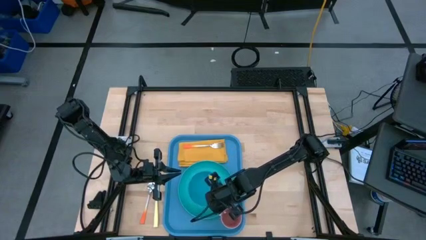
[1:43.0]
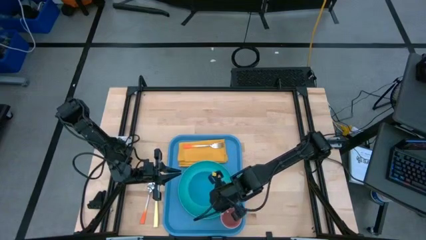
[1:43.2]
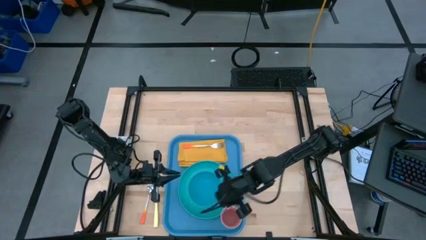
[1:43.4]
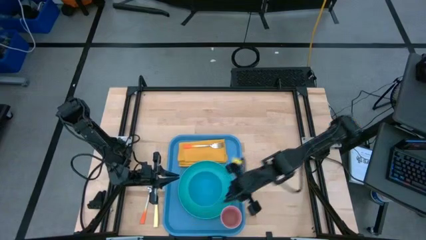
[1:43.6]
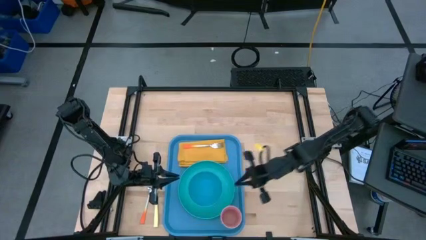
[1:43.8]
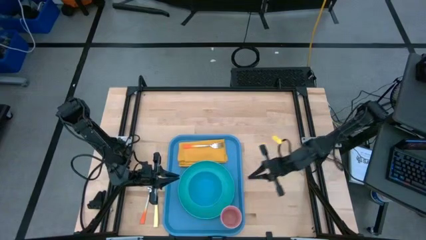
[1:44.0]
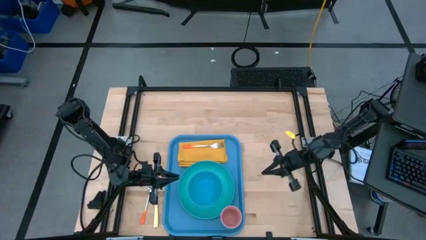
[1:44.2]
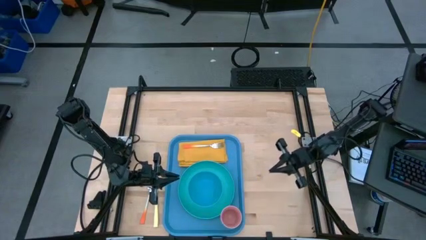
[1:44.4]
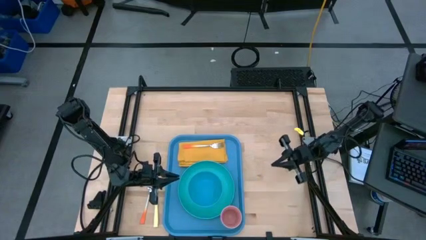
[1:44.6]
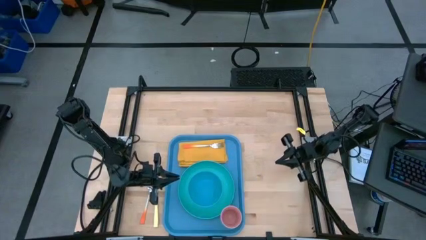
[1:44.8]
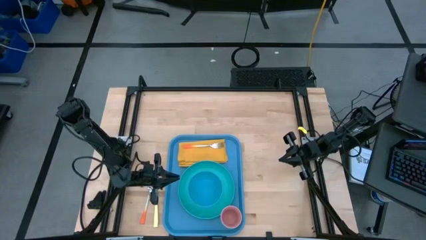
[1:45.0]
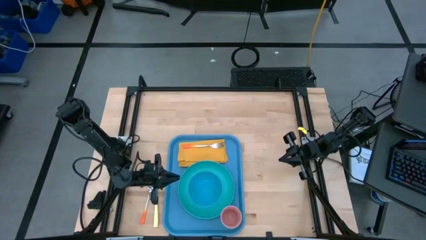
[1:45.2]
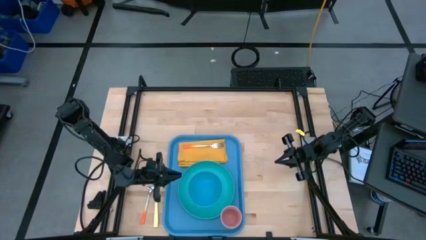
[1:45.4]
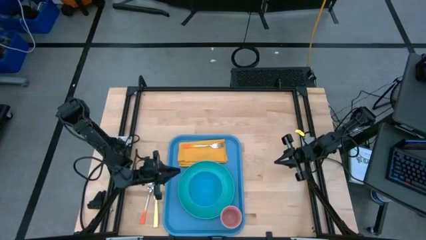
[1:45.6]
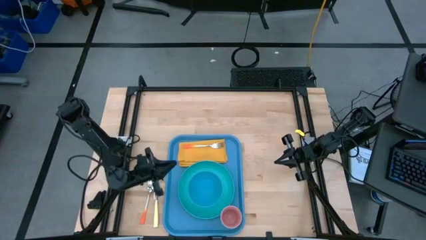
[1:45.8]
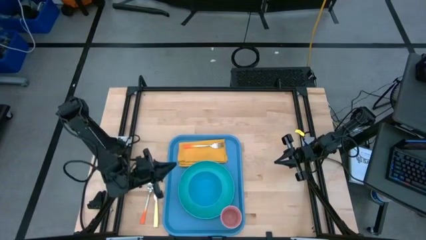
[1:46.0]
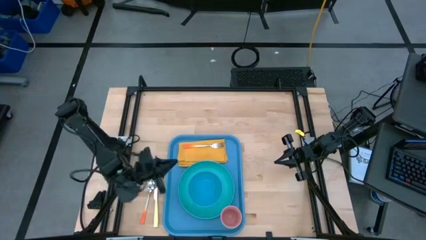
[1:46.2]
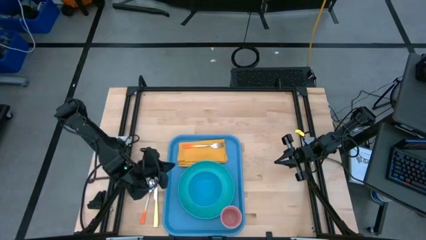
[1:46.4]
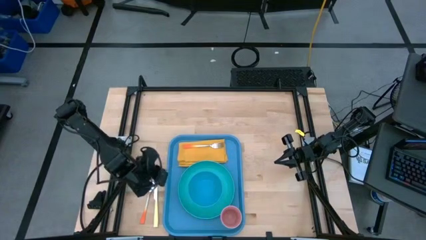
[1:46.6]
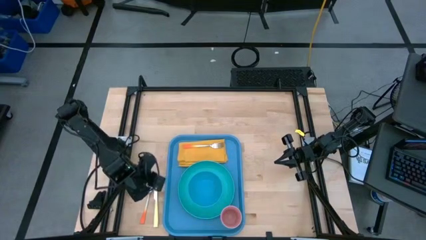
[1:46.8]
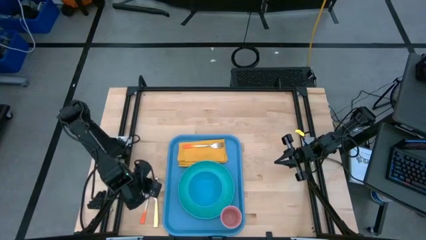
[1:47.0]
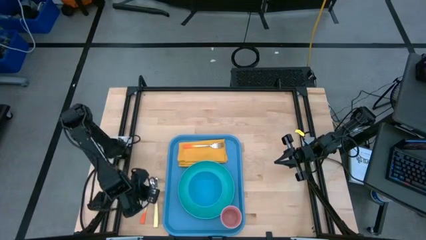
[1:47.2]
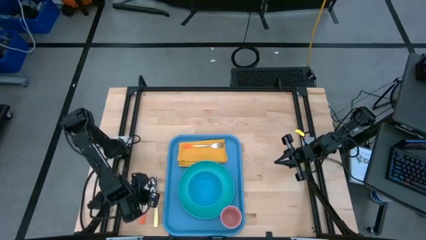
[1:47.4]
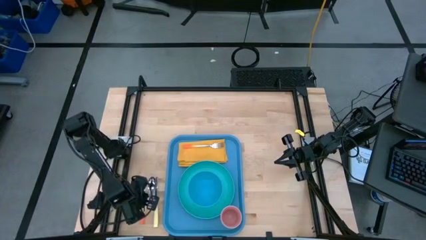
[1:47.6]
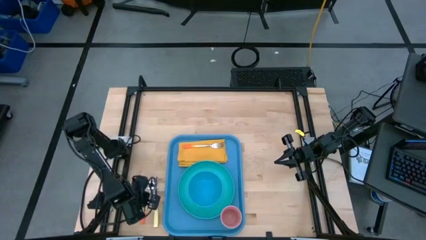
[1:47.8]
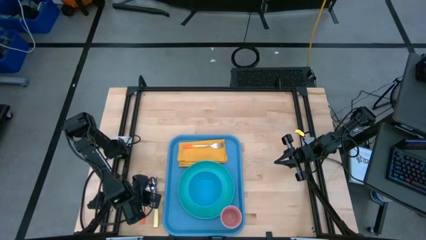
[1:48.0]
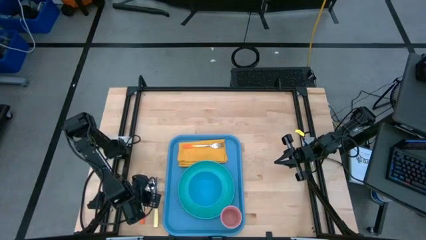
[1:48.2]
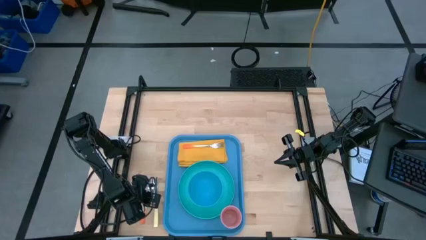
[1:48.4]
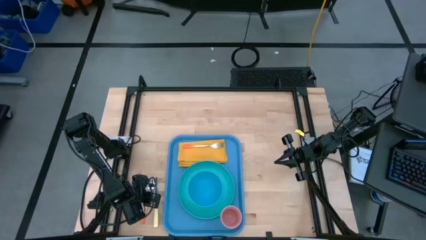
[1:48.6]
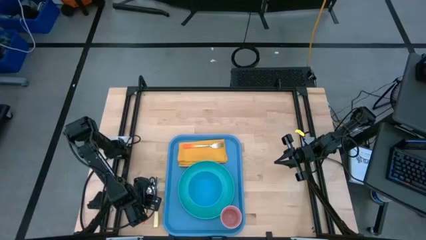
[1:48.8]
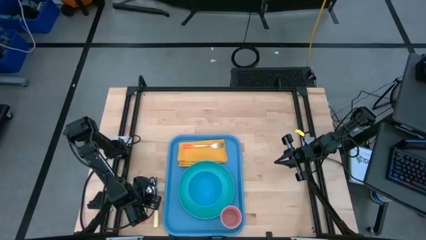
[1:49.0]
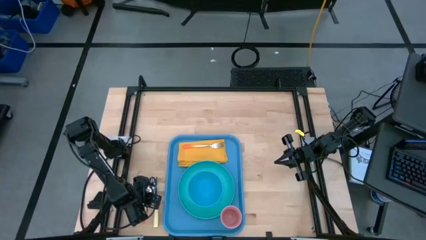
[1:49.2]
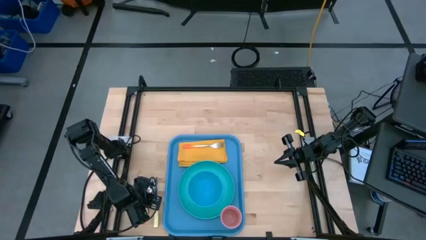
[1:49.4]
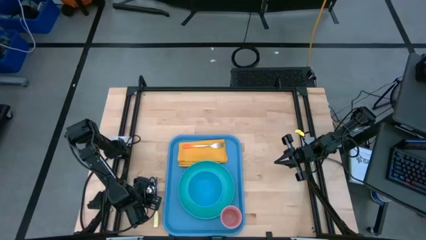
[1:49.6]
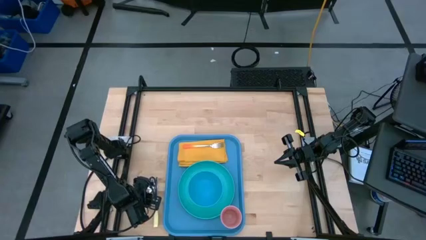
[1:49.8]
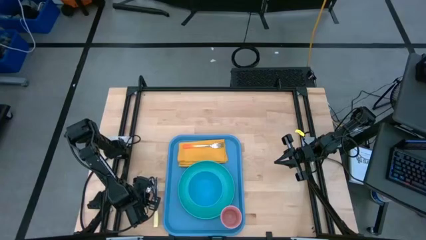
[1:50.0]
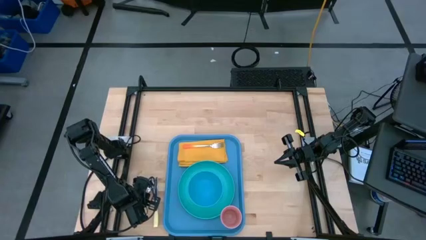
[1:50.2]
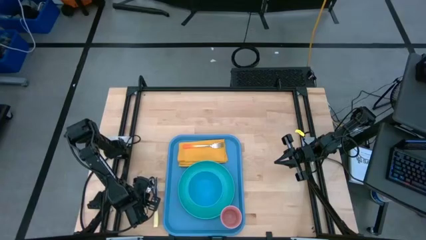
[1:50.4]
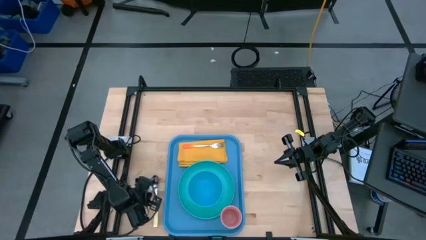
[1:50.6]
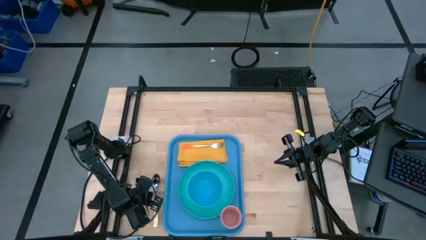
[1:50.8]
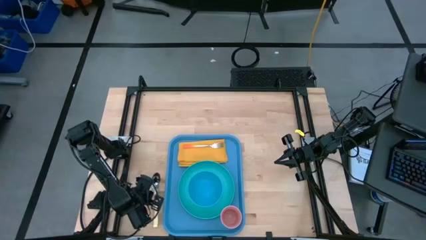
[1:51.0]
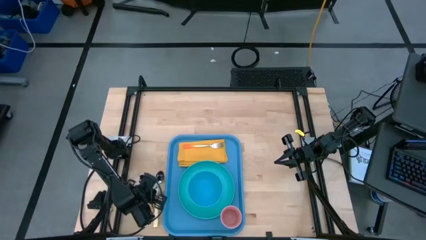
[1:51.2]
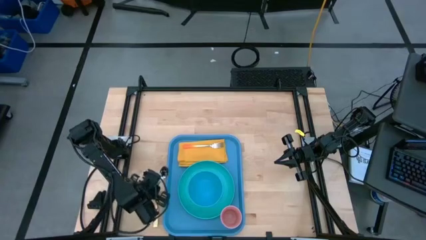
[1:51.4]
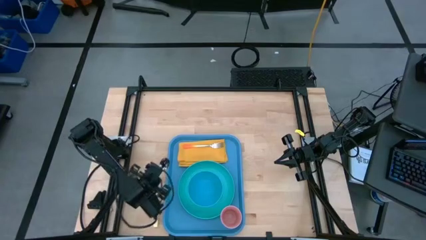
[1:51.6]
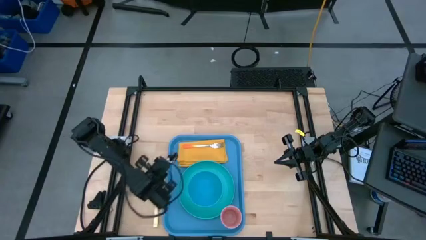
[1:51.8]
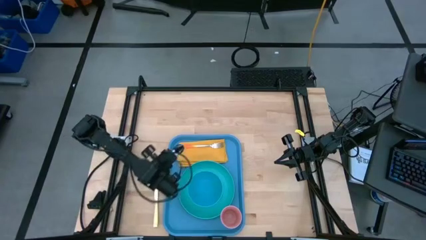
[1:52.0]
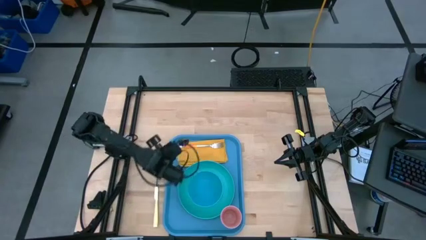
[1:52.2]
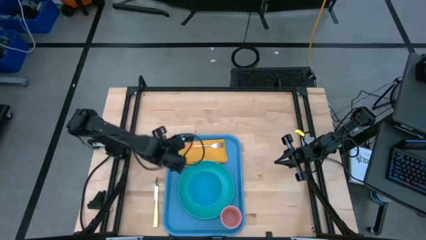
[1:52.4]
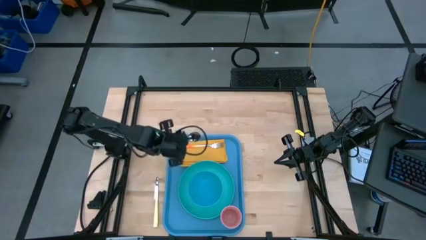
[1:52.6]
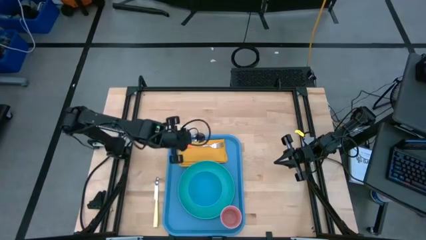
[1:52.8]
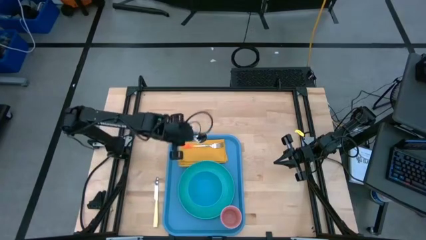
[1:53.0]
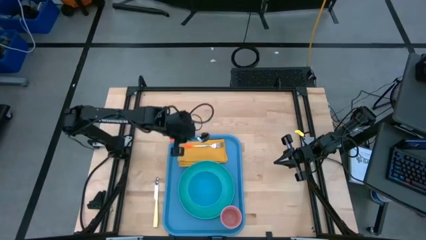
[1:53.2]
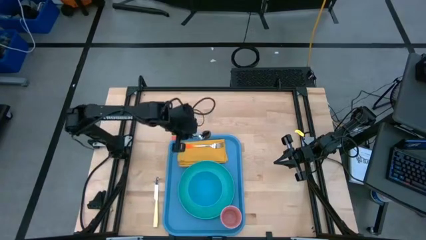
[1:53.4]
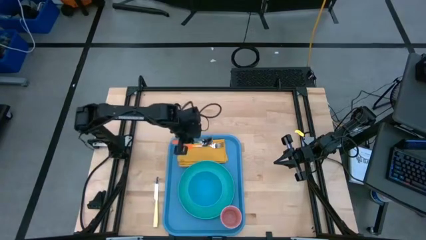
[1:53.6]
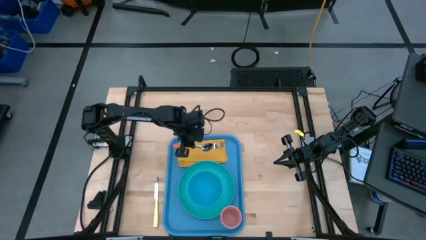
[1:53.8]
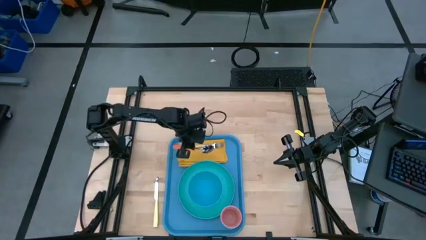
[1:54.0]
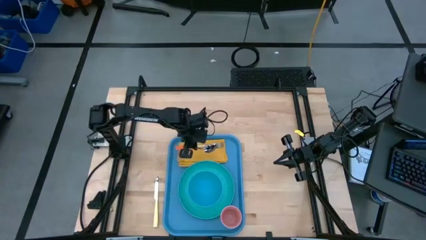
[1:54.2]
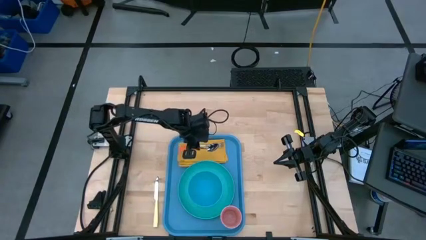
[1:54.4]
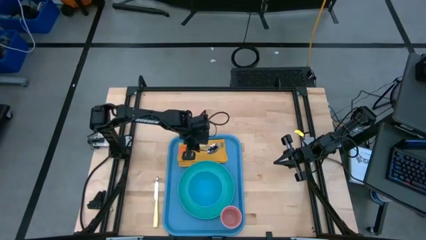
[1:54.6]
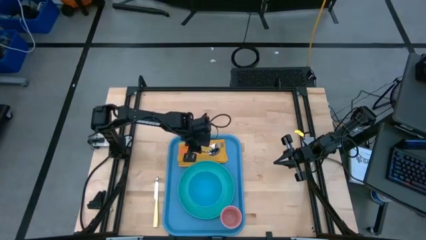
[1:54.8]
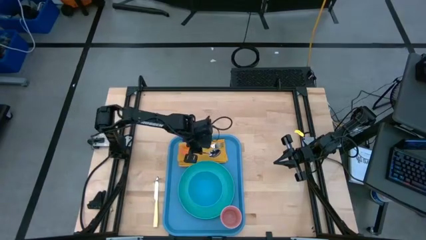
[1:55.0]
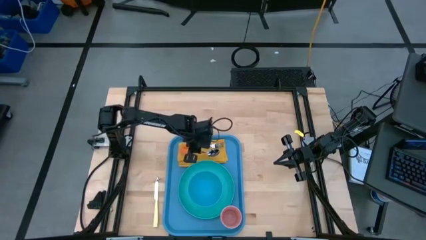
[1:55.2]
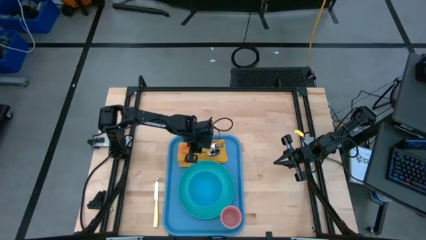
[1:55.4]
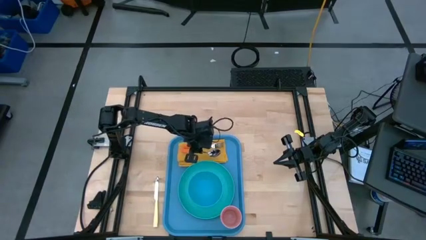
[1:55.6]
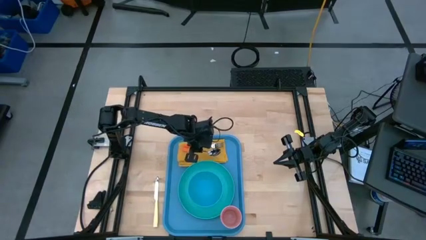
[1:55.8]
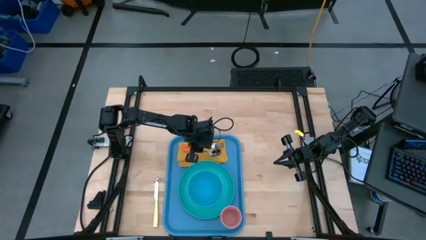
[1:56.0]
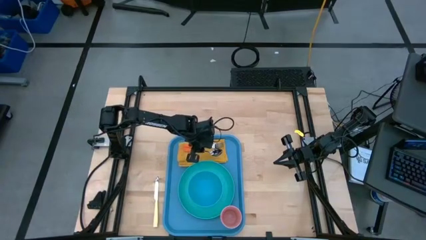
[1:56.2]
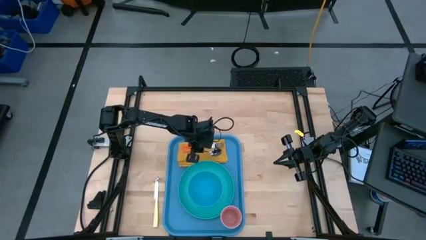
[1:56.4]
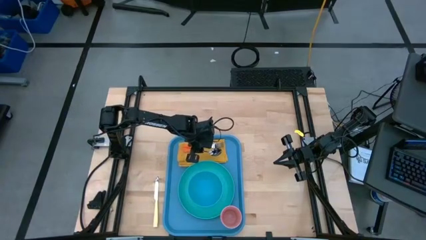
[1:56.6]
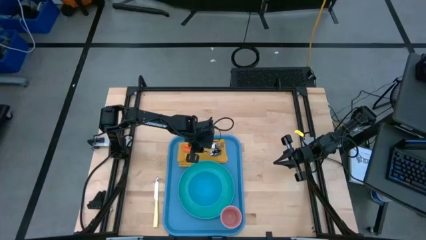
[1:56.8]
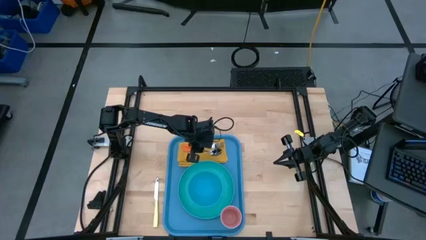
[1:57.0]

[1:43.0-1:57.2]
Task: Set up tray
Put the orange spoon to the right of the orange fork on the napkin on the blue serving tray

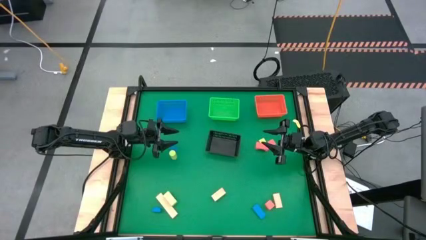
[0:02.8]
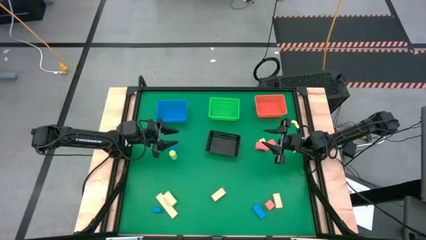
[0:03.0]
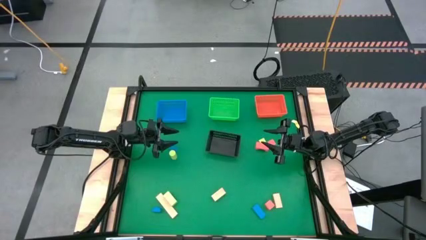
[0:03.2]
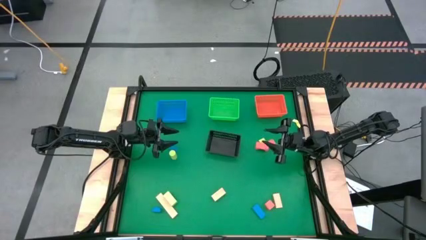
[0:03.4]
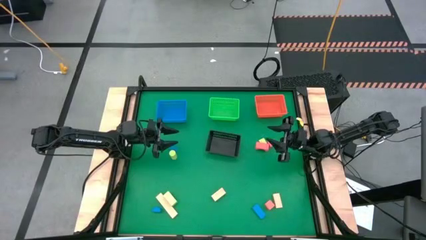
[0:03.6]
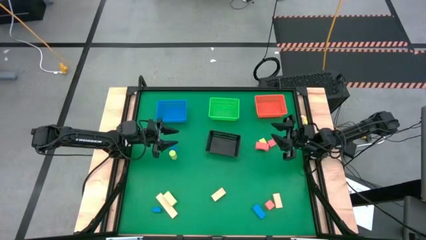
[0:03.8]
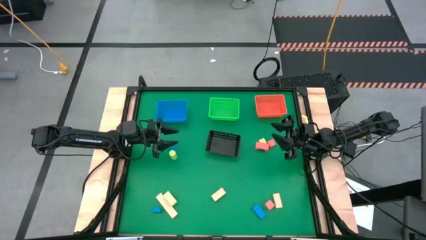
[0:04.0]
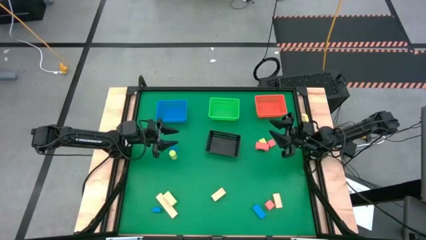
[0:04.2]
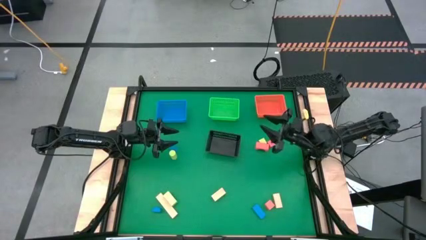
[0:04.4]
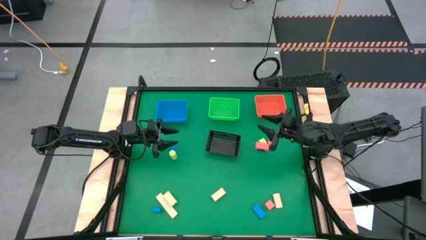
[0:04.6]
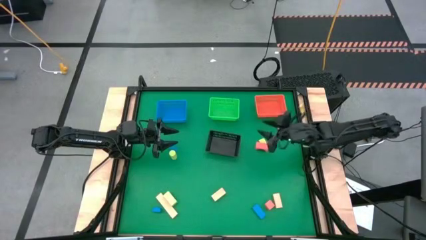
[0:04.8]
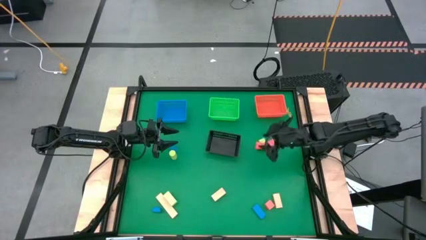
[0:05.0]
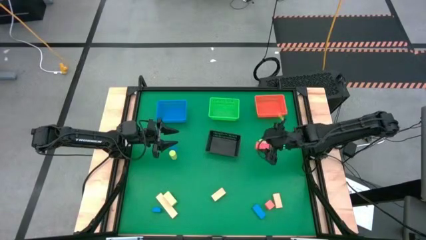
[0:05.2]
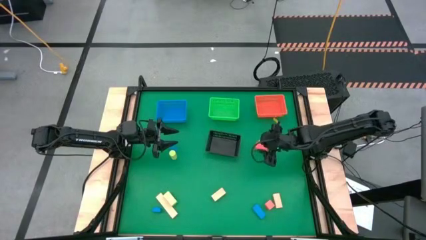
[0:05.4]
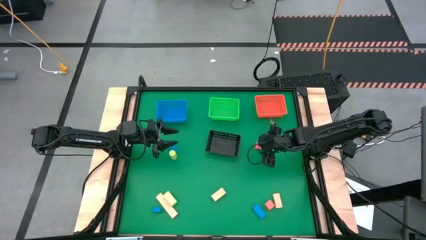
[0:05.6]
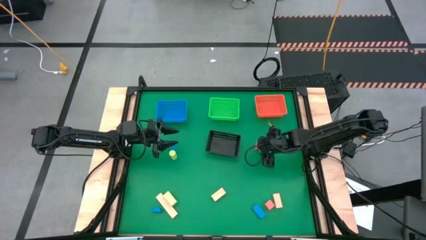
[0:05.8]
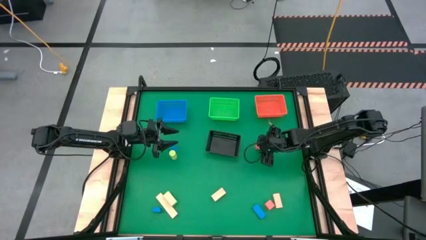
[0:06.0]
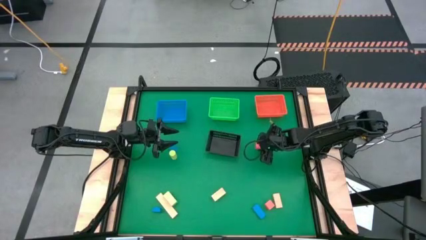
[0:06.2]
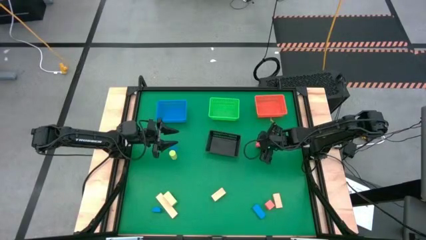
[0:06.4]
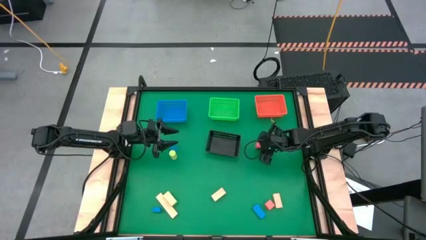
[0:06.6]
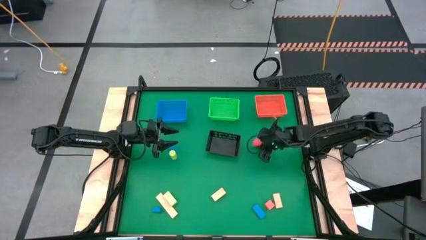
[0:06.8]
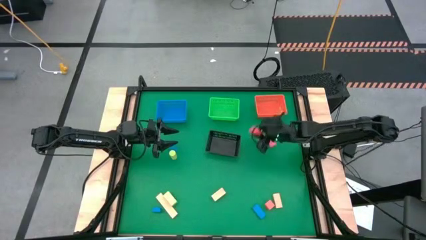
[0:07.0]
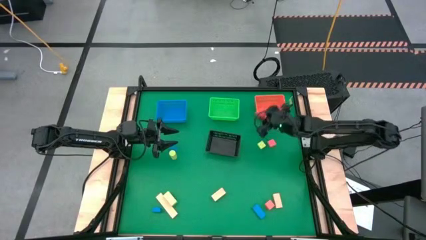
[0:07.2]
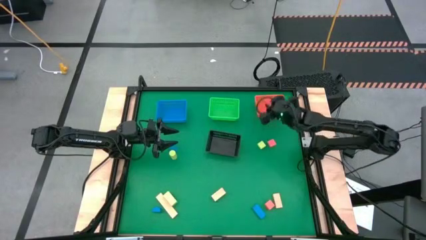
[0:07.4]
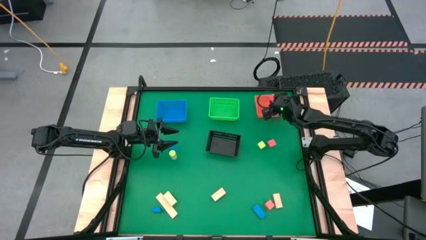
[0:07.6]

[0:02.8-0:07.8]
Task: Sort & place blocks by color
Put the top left orange block into the orange bin
